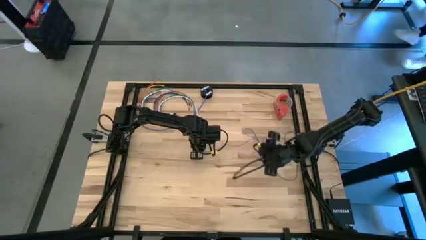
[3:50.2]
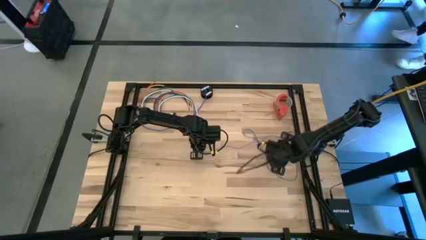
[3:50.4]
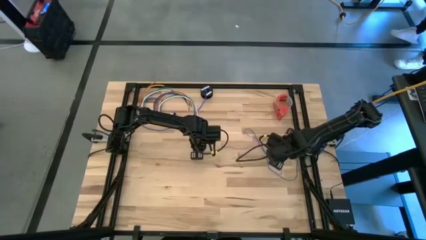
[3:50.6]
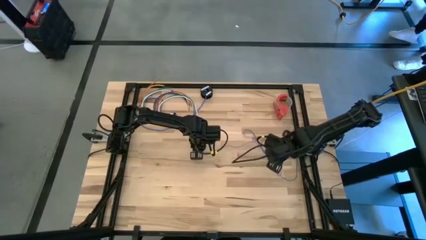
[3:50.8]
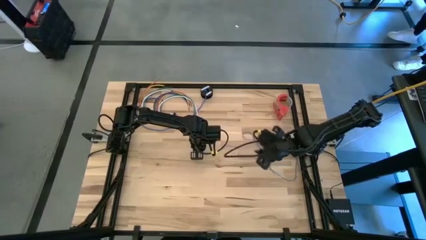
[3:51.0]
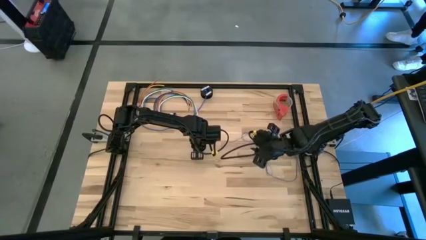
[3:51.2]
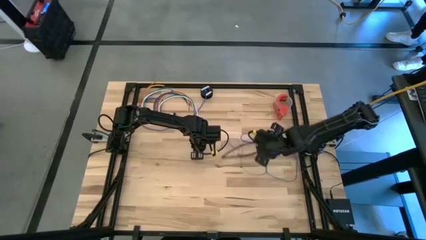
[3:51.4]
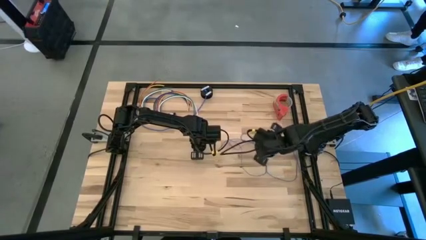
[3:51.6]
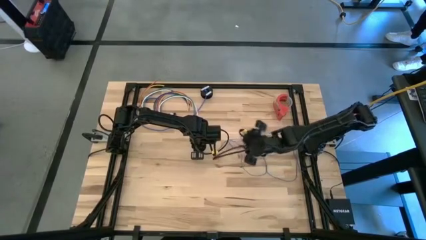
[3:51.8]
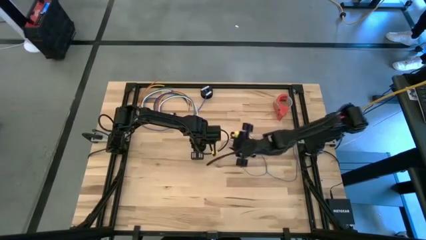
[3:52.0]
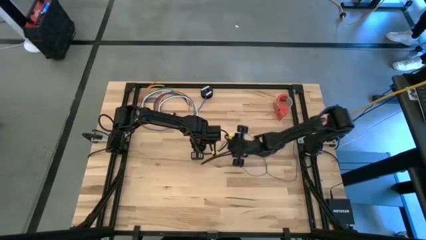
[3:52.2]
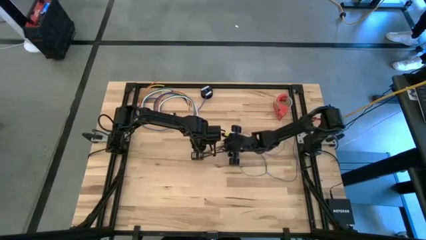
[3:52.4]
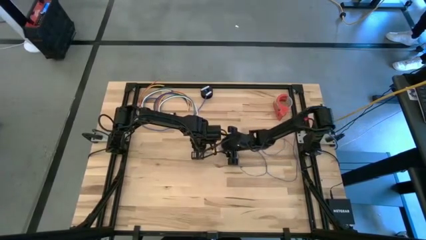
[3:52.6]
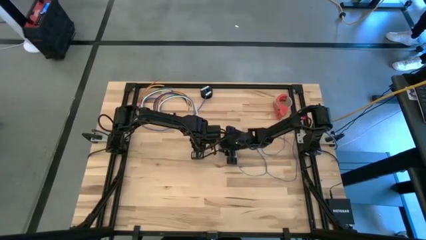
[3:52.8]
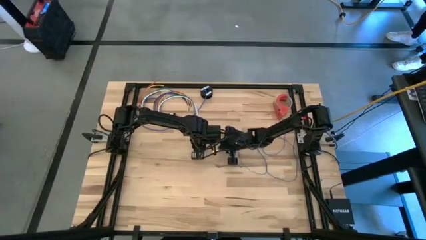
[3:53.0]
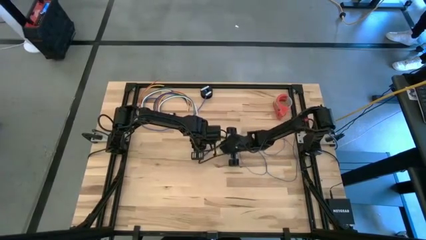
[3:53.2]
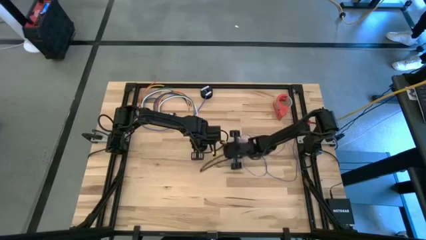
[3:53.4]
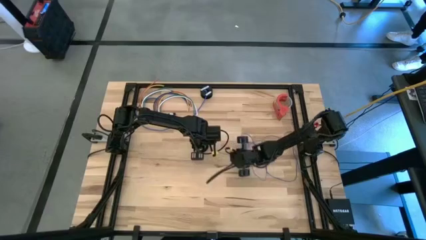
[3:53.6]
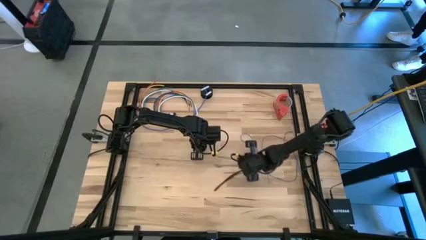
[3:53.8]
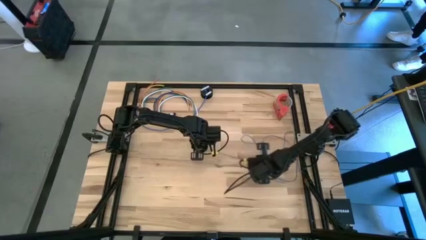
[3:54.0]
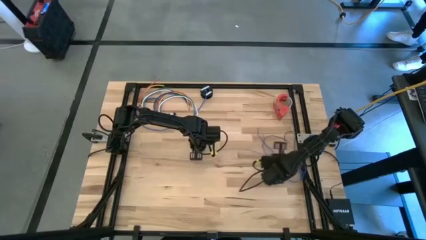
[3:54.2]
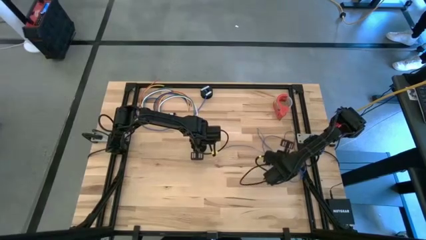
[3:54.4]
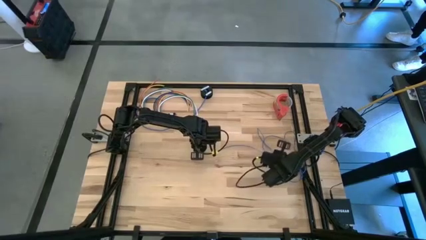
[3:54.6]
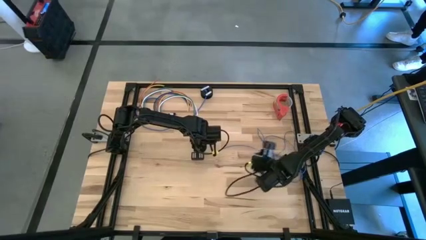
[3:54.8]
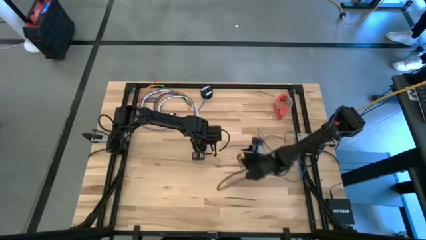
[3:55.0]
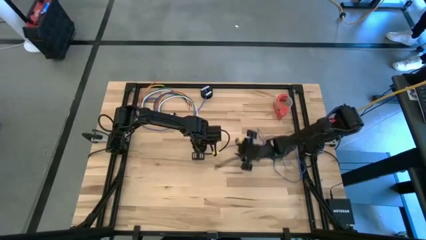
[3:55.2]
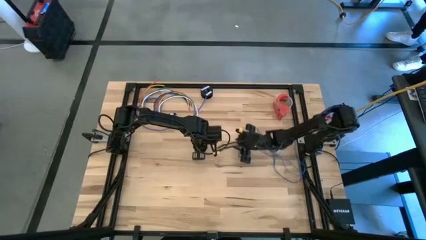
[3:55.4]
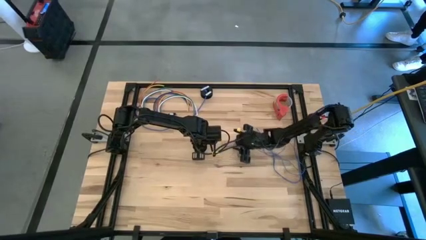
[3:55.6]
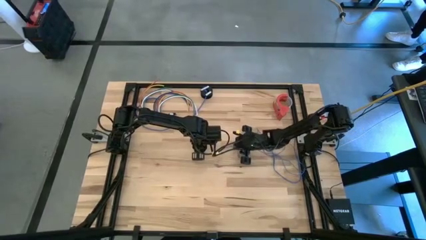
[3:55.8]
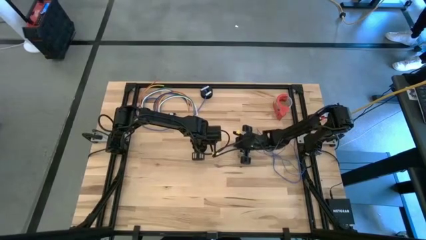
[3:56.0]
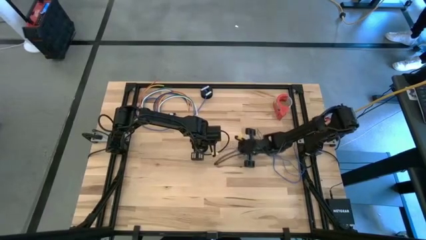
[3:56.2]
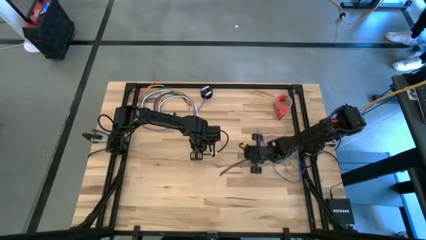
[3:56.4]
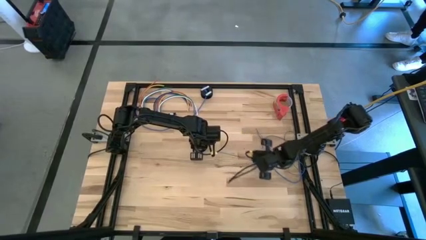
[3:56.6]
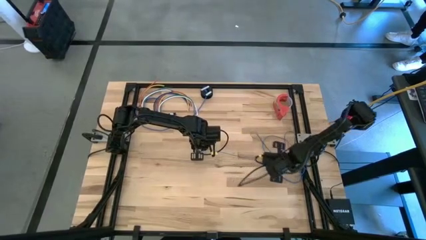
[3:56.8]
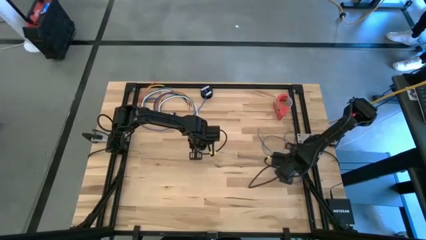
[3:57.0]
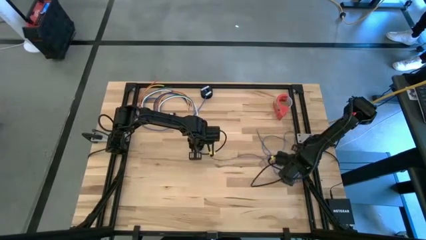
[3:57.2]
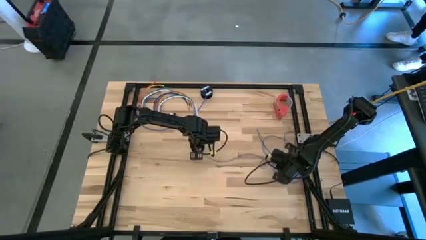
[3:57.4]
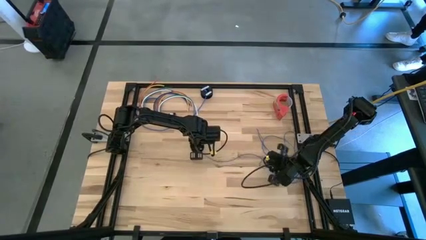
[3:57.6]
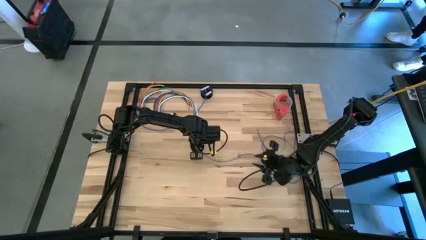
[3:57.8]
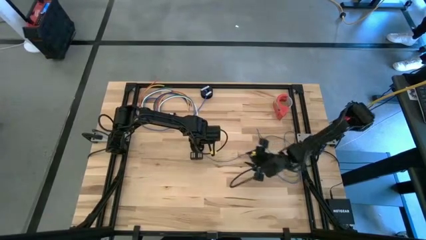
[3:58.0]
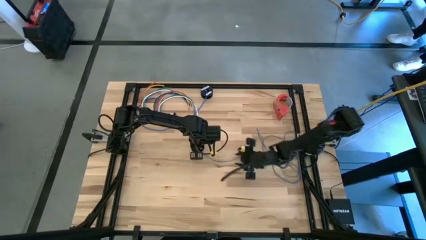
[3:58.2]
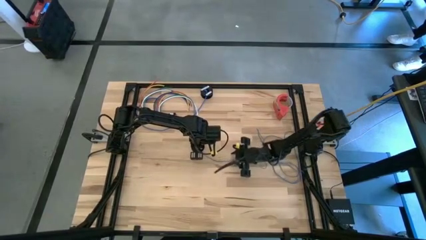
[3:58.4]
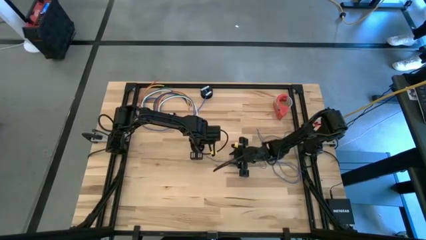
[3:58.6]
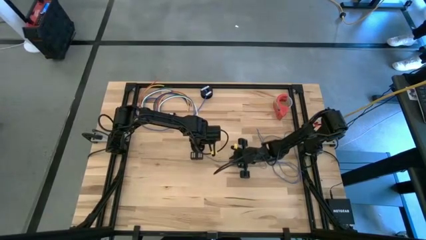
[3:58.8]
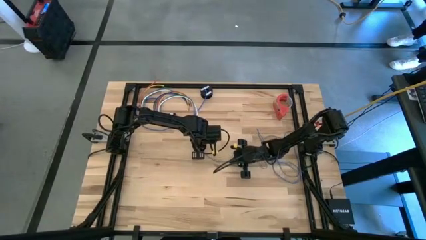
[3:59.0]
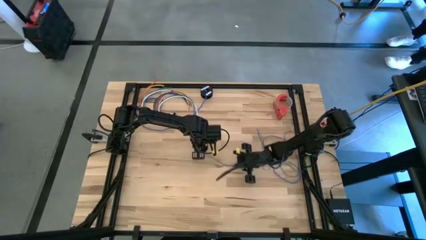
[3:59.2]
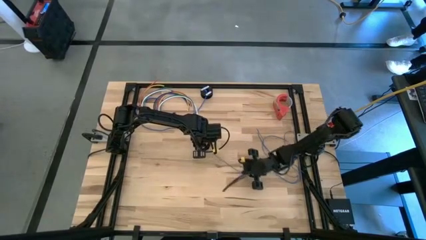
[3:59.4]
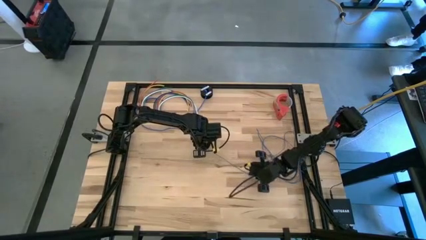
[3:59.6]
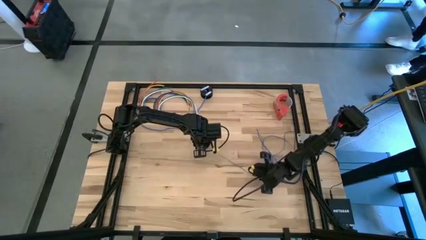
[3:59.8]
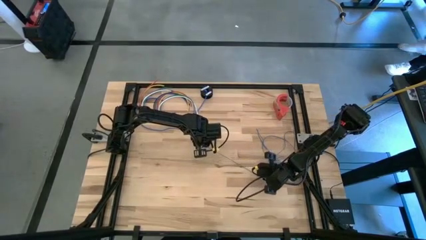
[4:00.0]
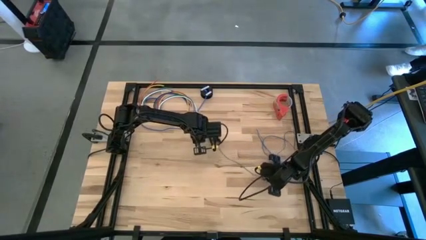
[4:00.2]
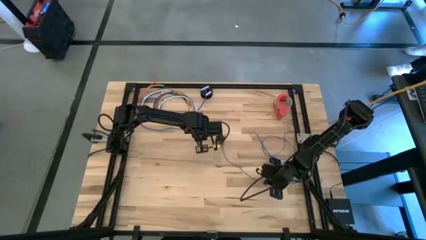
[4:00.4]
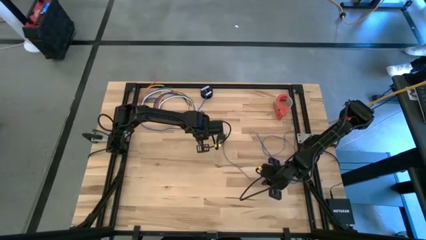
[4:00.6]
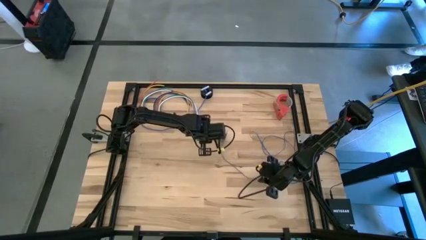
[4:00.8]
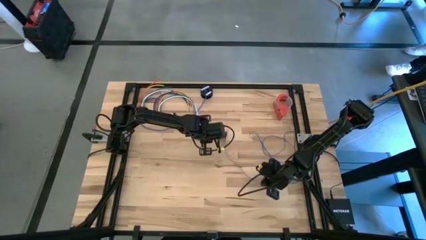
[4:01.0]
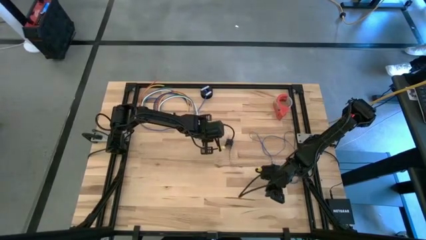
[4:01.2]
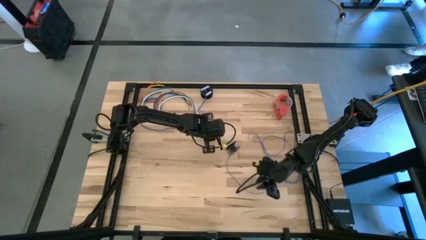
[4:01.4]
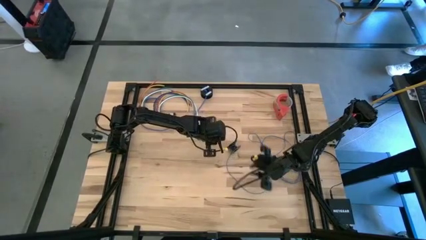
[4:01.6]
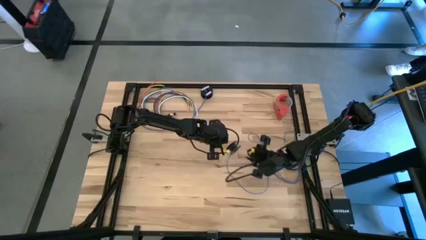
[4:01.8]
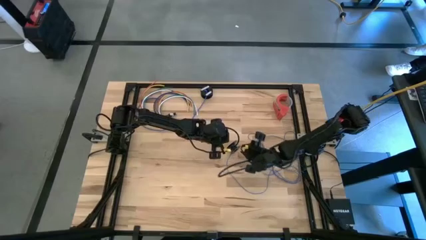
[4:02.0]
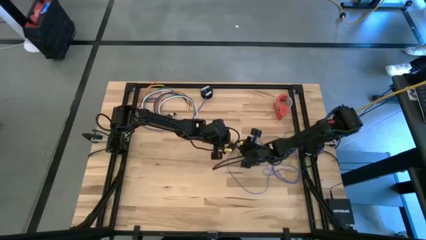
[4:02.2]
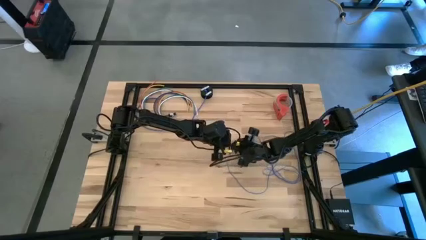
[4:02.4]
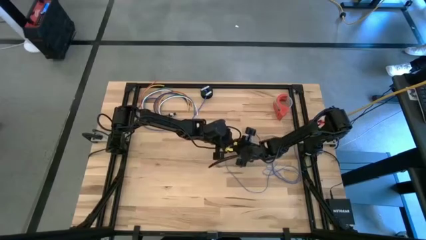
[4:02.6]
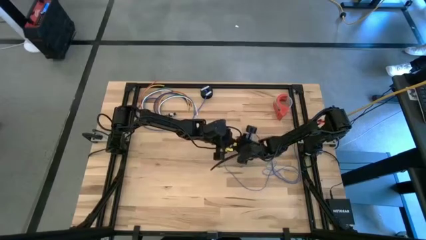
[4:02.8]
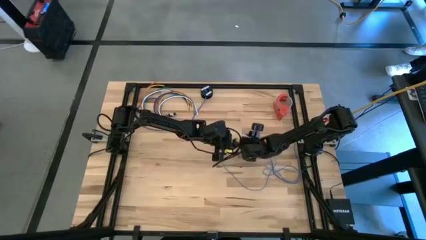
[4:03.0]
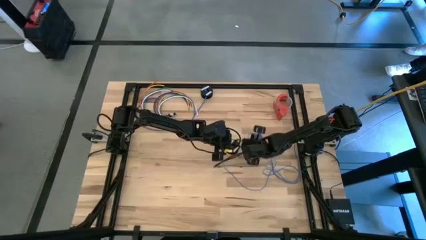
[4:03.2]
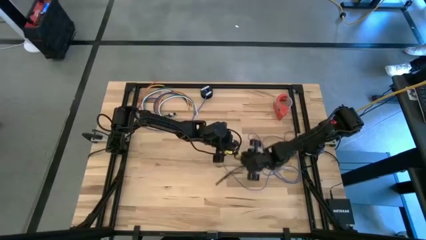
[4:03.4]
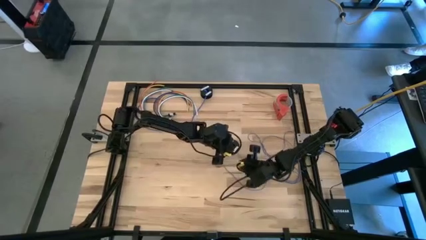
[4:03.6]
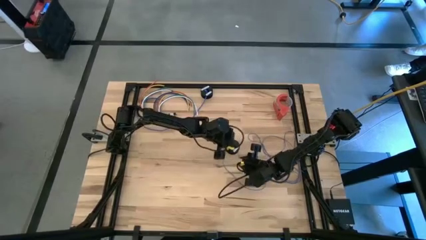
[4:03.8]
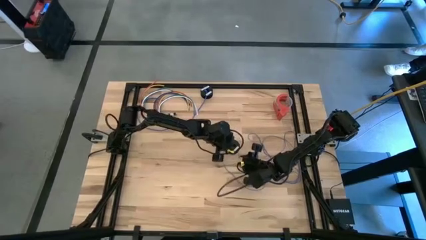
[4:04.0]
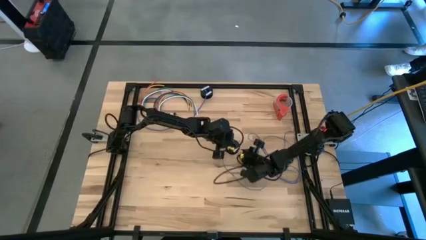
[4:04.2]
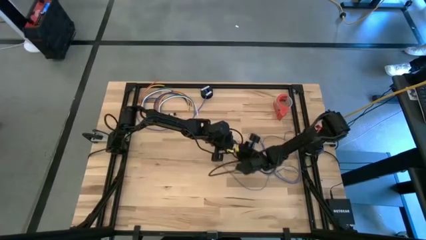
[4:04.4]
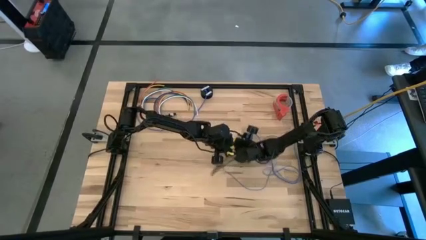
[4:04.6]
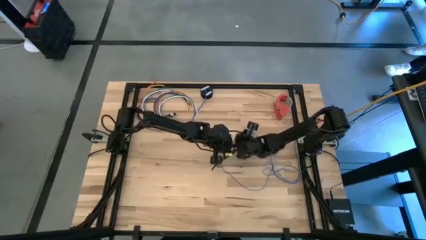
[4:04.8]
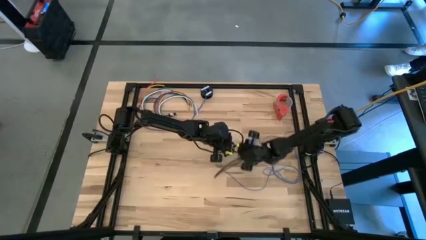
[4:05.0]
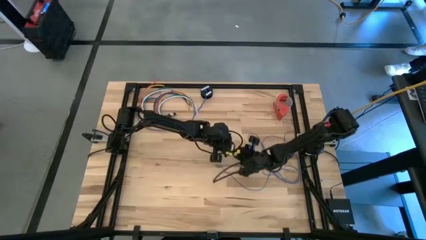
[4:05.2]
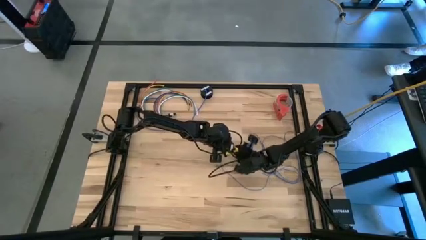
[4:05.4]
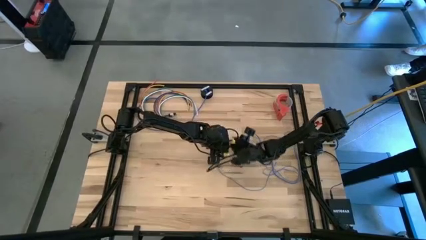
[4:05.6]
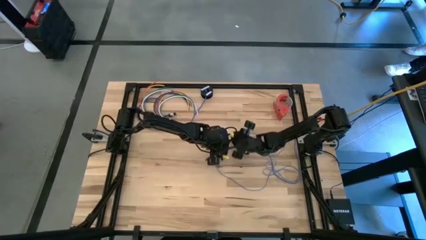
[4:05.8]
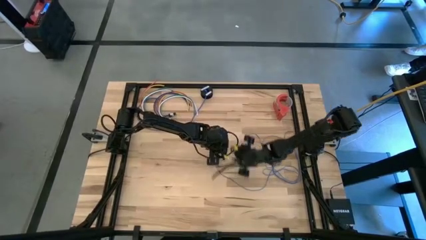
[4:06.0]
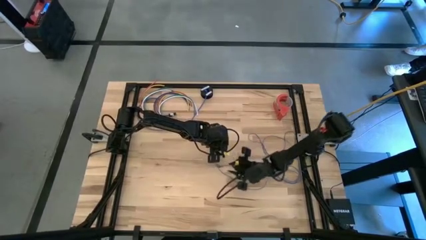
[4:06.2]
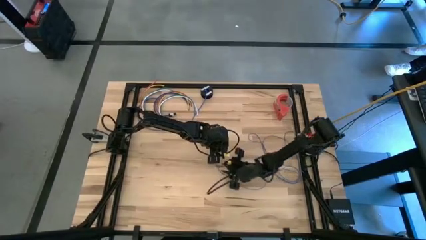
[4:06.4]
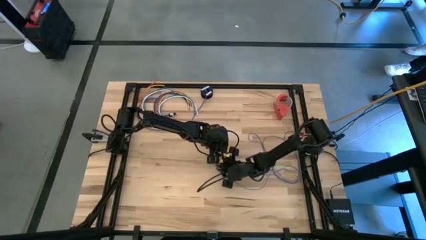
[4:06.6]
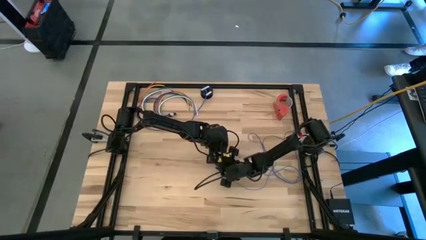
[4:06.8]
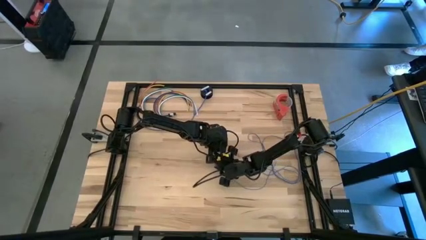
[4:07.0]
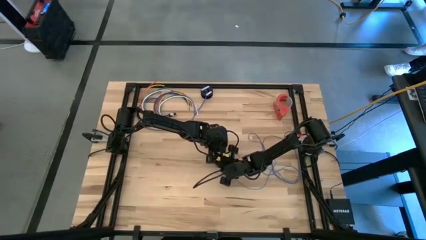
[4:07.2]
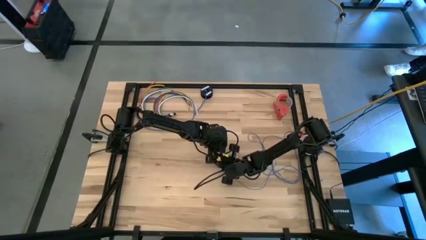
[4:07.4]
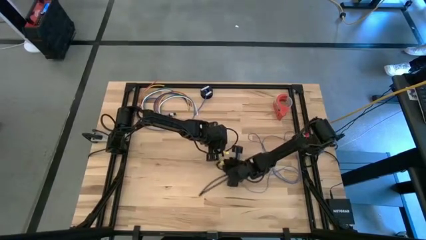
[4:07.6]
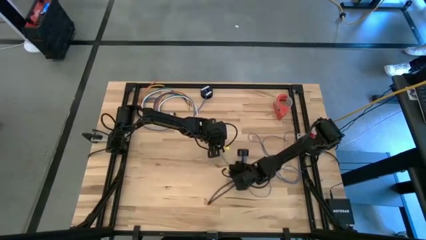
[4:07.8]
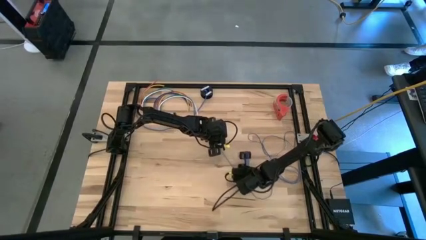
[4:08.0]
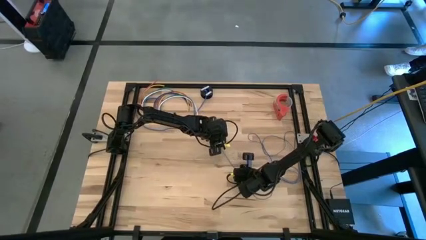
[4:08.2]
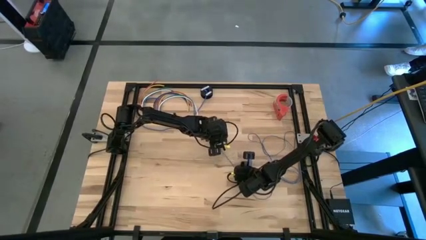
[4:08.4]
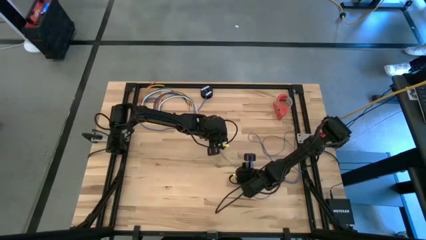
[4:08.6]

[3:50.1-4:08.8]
Task: Coil cords
Put the spool with the coiled wire on the table
